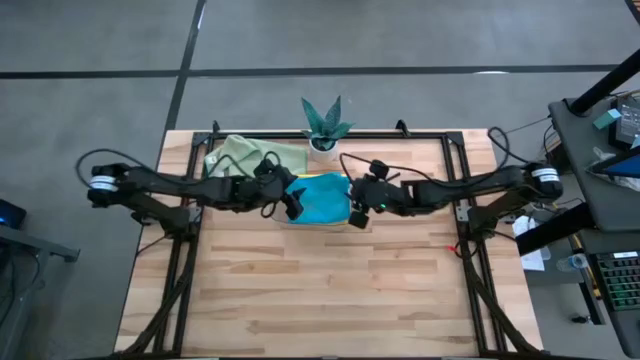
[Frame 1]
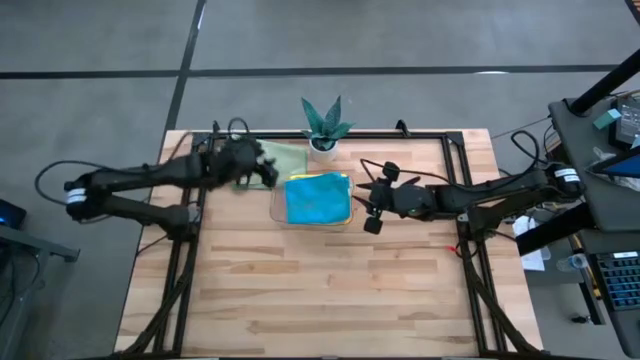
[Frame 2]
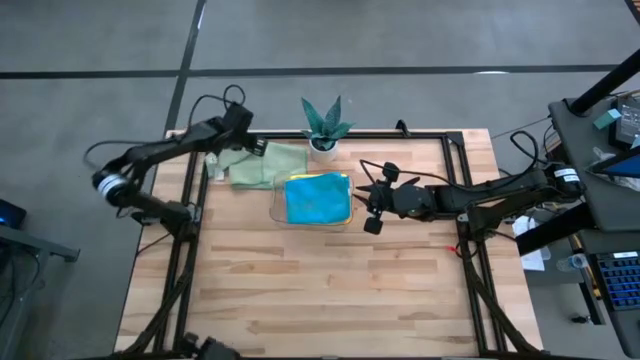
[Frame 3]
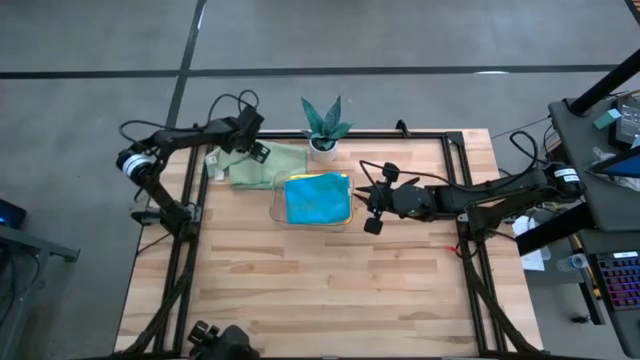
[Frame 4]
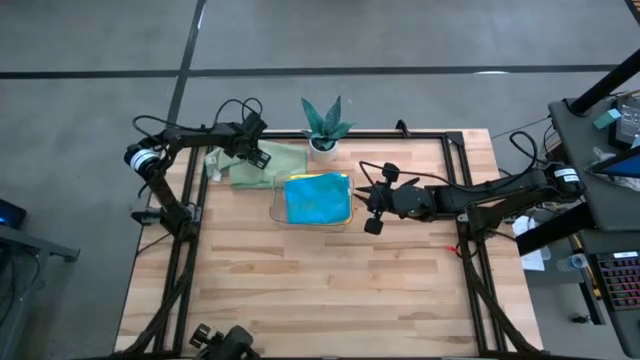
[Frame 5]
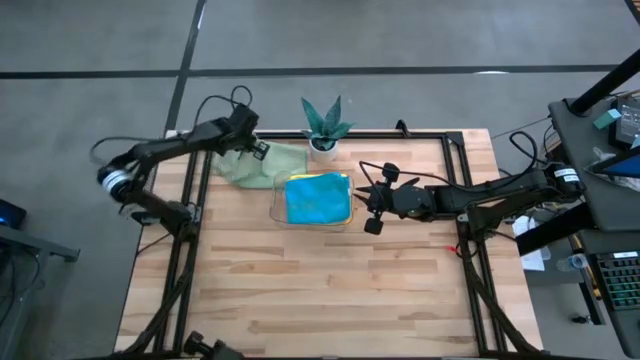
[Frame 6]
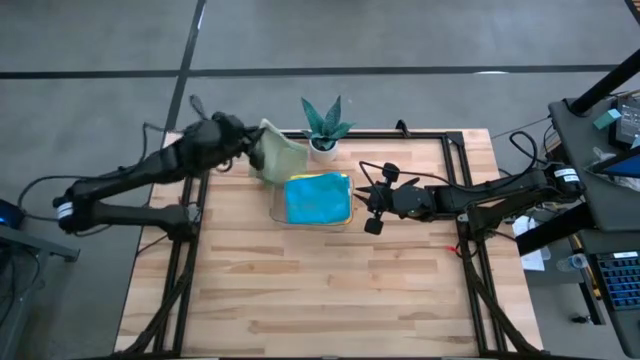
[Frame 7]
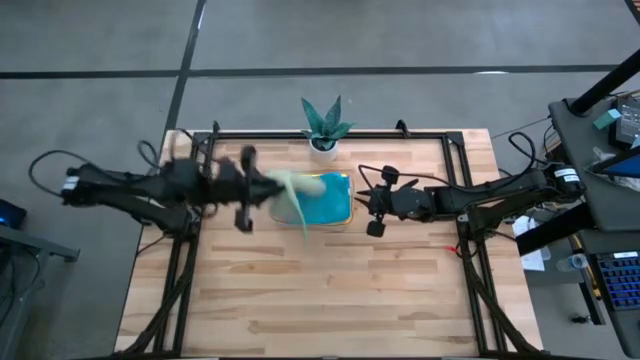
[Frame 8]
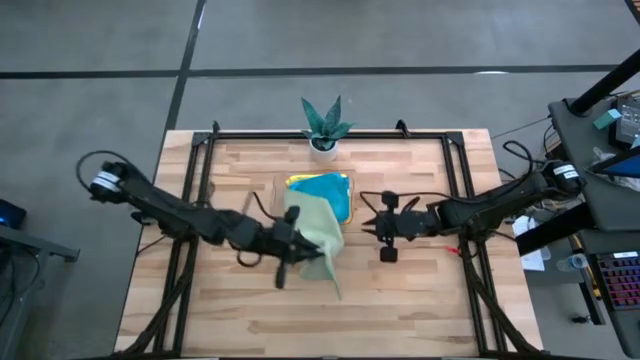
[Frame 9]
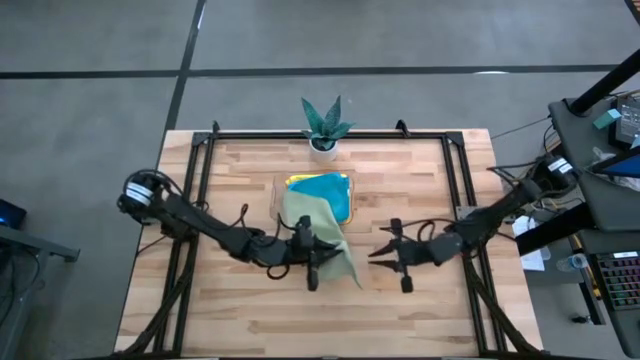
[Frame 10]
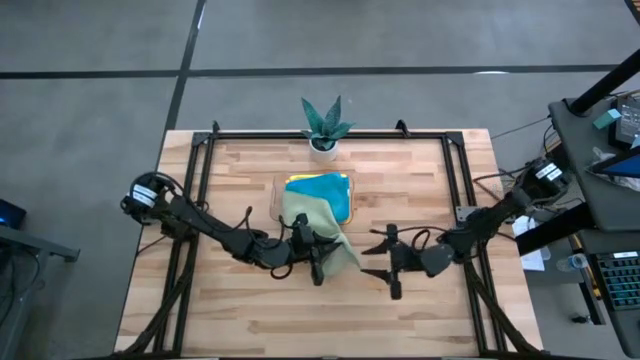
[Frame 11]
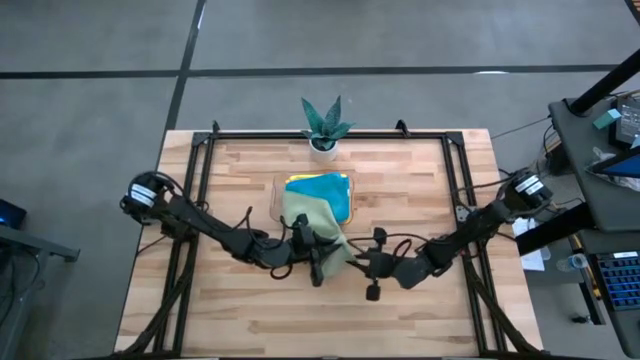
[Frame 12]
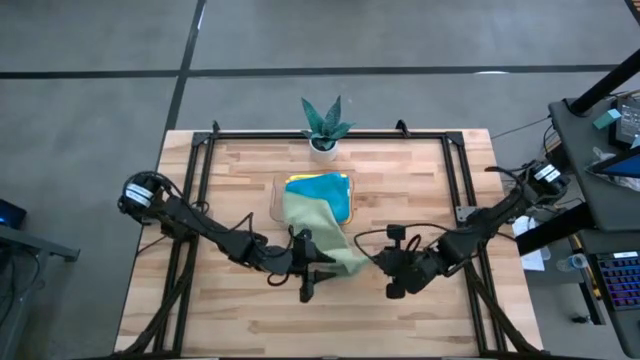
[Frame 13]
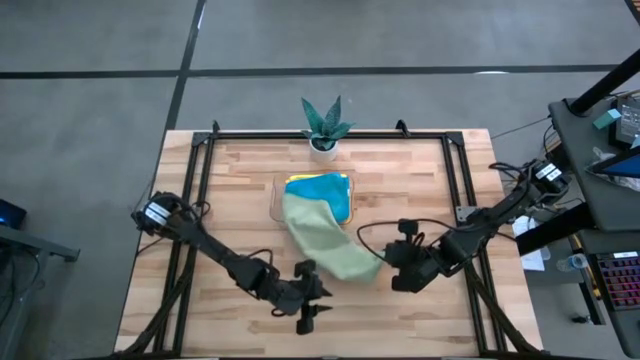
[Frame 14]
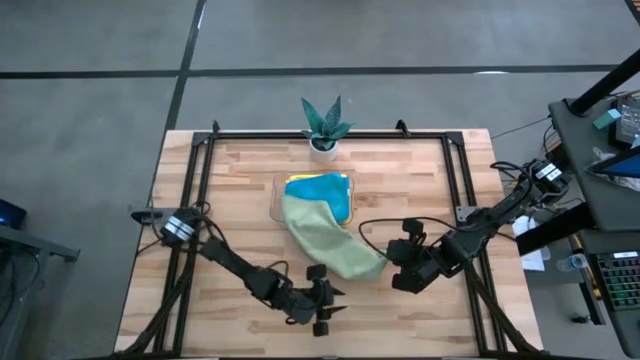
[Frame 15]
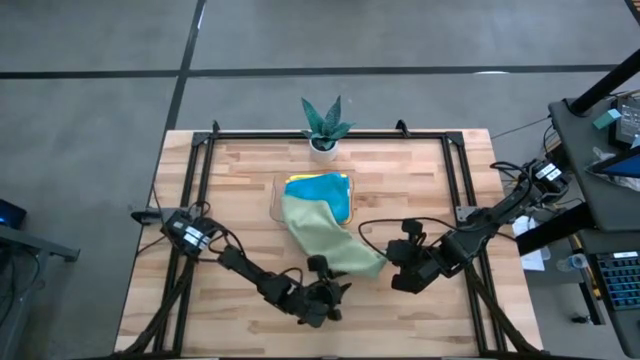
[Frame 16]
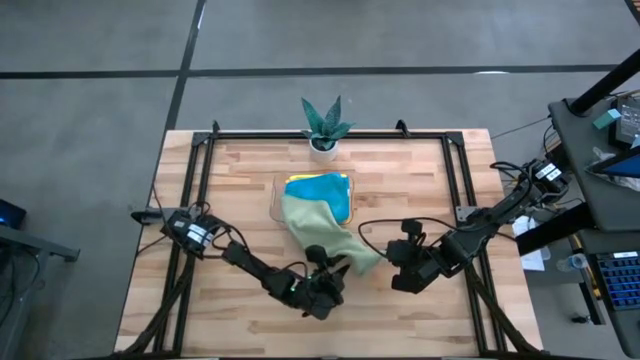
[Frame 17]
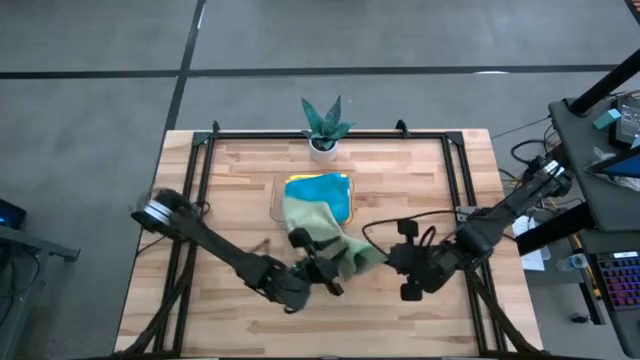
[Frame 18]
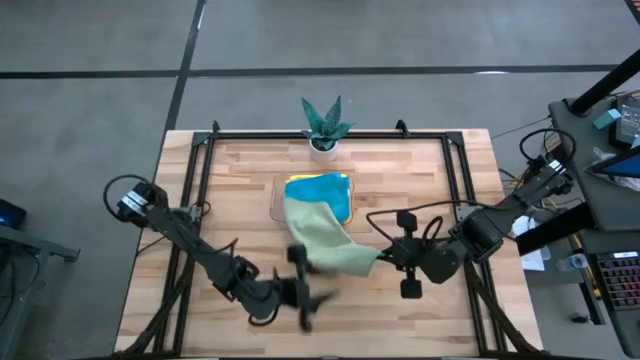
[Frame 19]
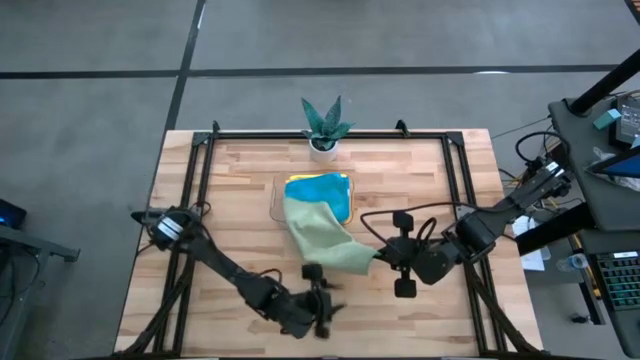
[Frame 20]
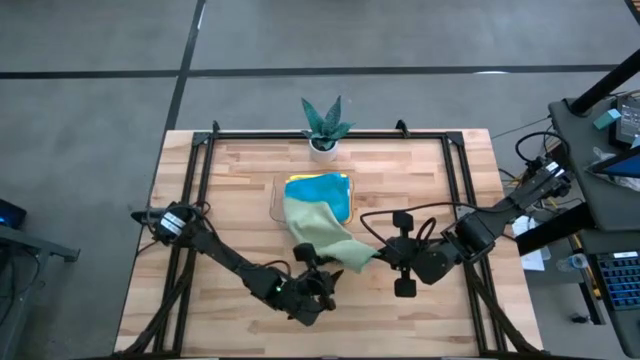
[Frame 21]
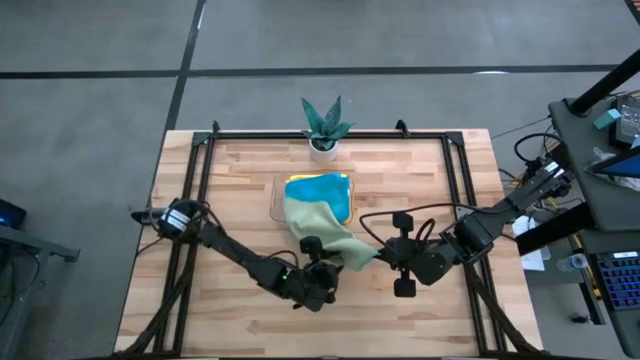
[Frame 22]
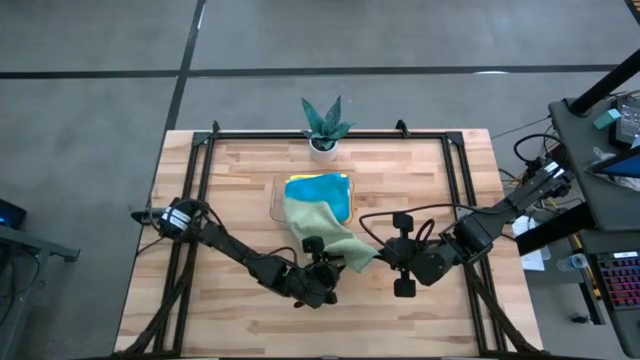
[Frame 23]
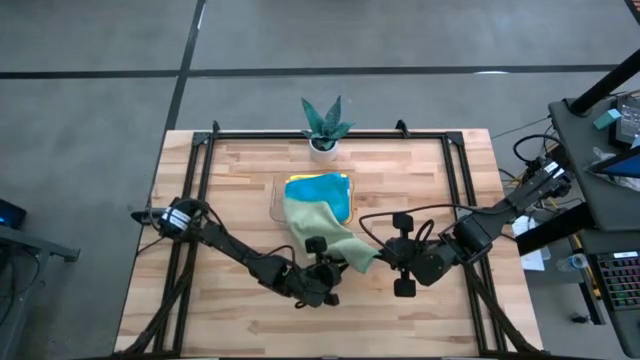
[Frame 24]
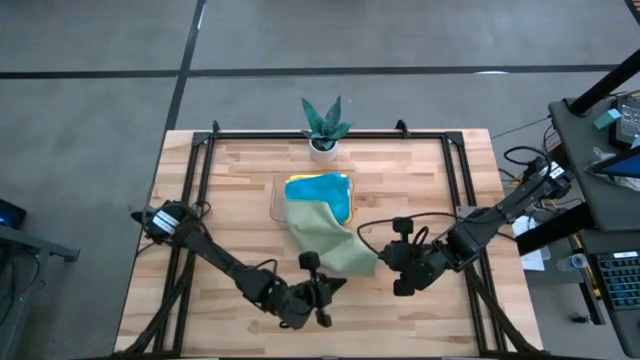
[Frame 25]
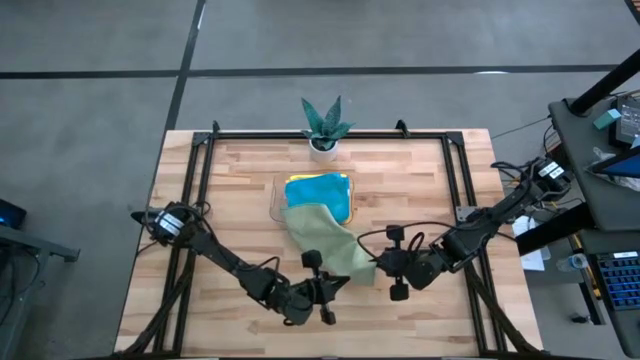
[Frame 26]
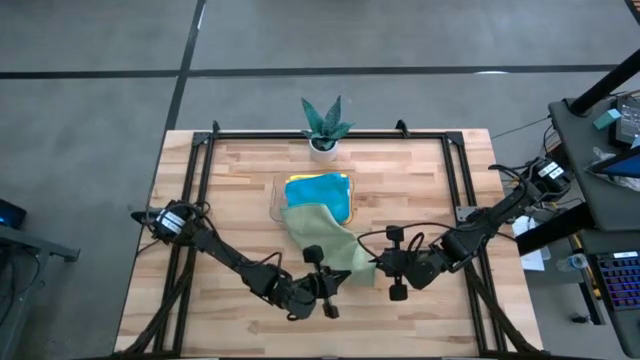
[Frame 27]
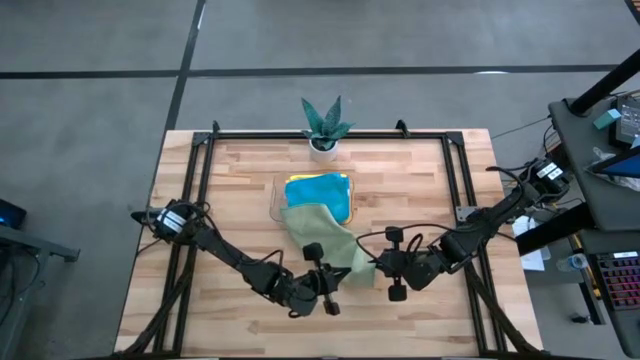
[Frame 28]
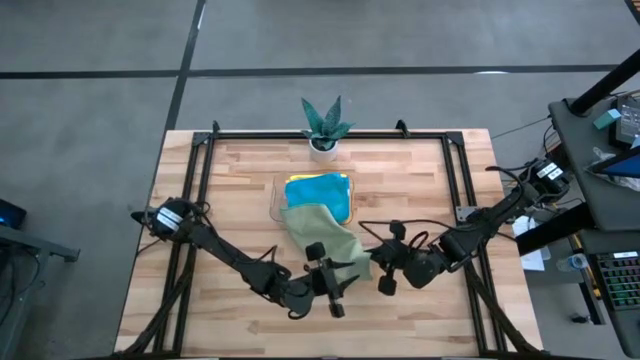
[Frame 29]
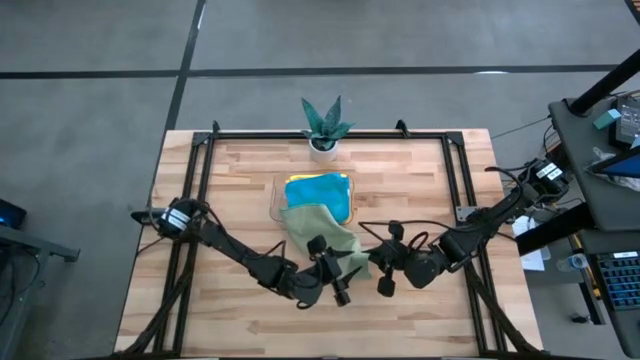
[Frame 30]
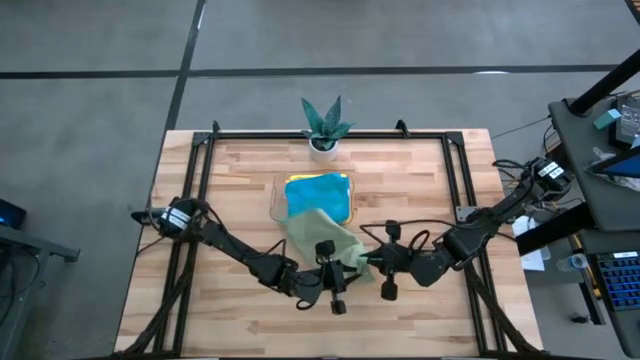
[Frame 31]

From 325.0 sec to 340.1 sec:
Task: Fold microfiber towels
Fold the green microfiber towel
